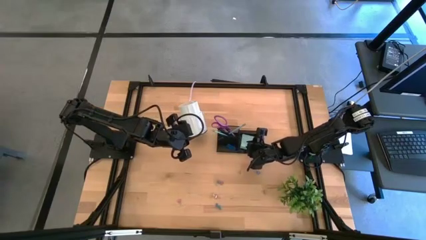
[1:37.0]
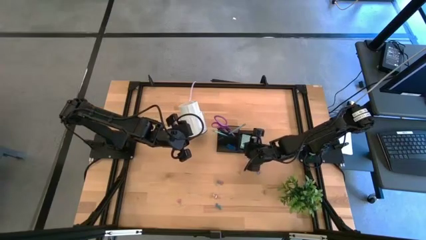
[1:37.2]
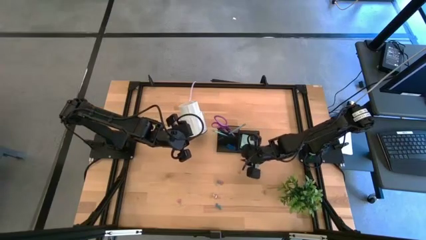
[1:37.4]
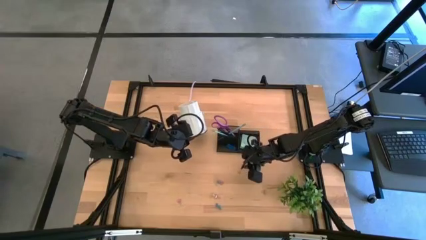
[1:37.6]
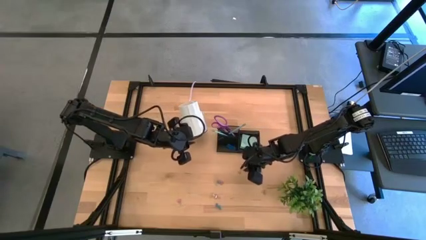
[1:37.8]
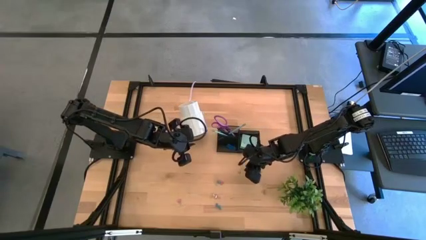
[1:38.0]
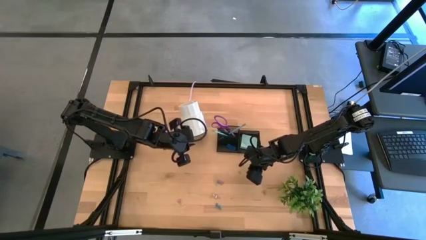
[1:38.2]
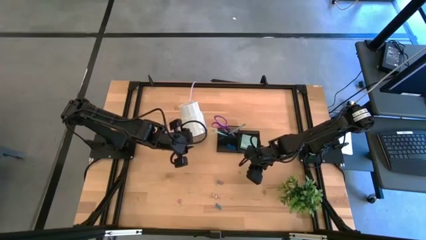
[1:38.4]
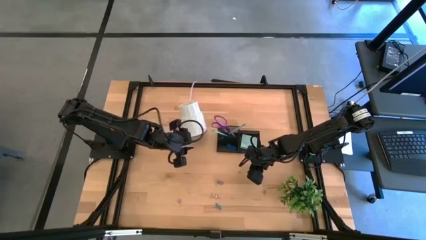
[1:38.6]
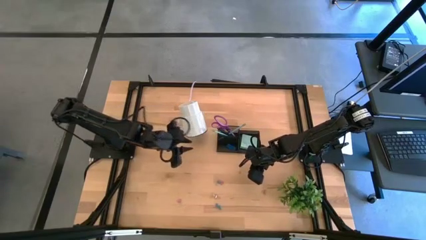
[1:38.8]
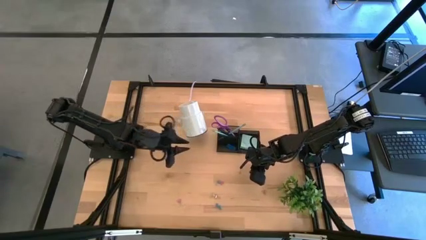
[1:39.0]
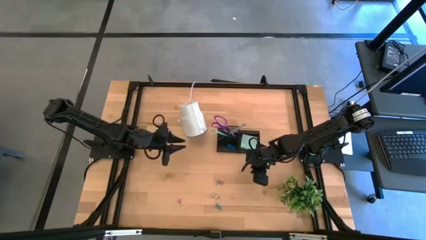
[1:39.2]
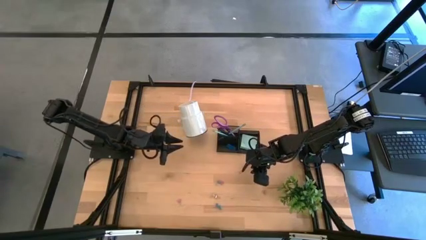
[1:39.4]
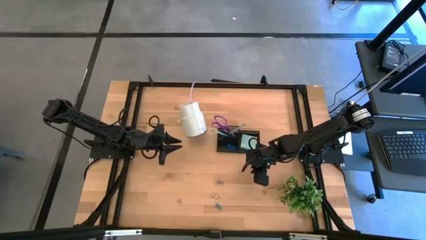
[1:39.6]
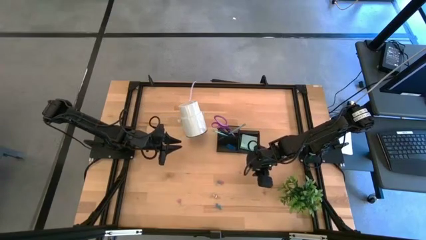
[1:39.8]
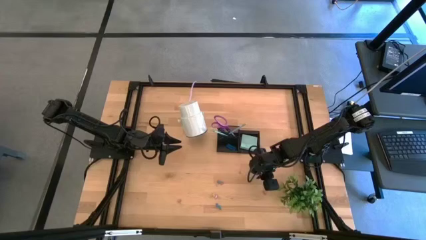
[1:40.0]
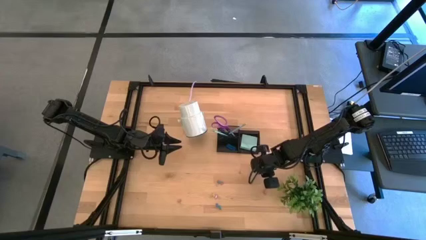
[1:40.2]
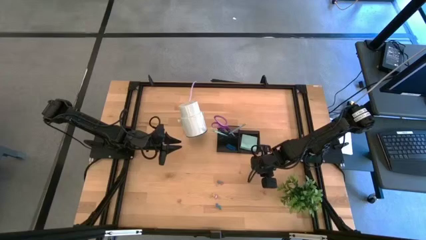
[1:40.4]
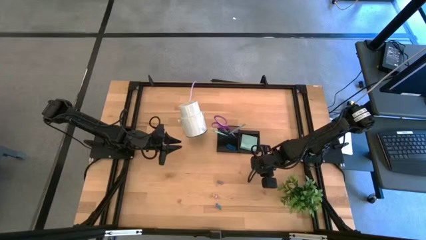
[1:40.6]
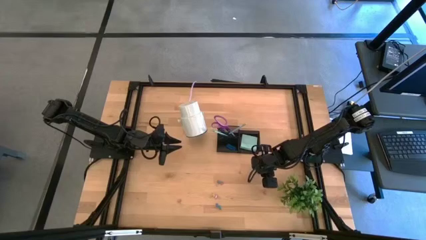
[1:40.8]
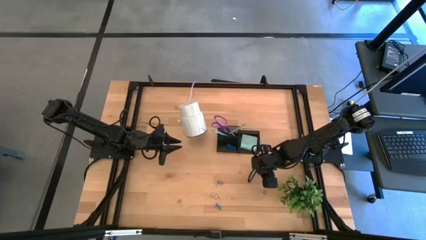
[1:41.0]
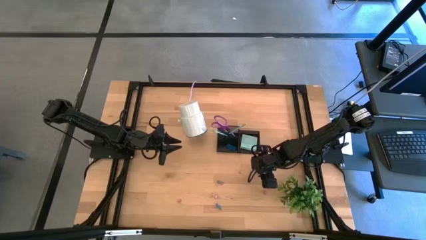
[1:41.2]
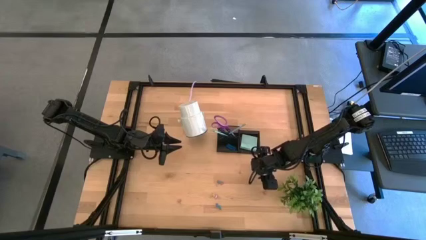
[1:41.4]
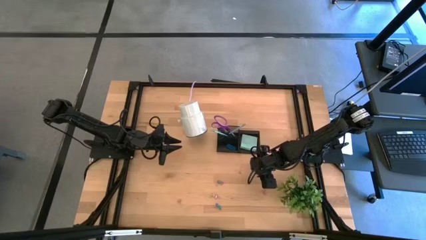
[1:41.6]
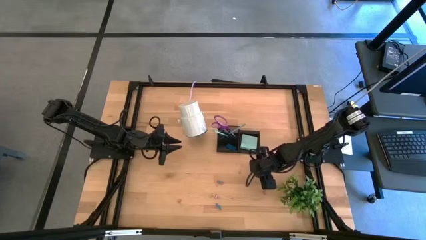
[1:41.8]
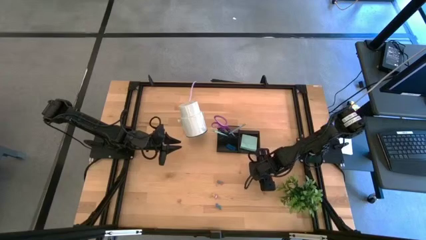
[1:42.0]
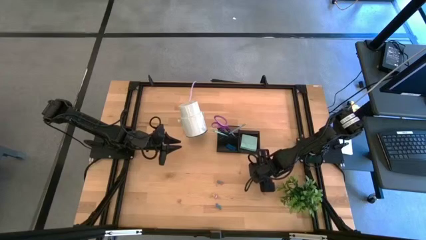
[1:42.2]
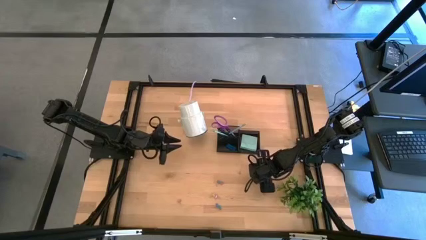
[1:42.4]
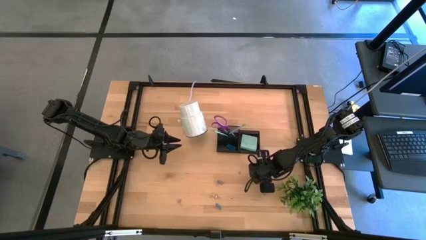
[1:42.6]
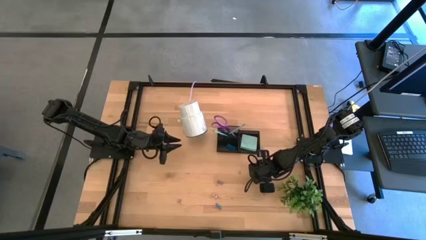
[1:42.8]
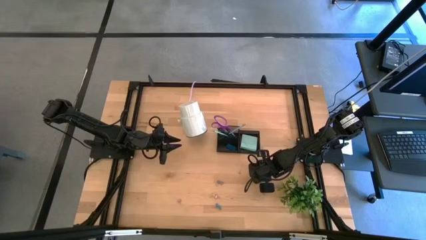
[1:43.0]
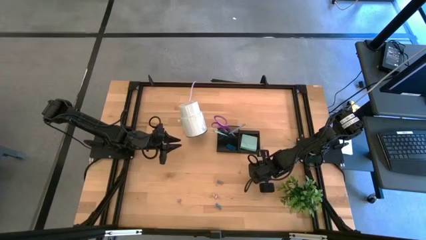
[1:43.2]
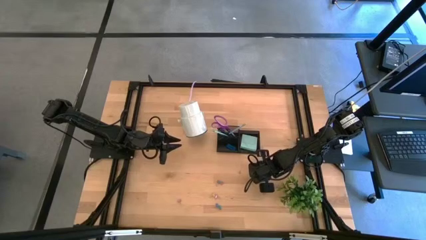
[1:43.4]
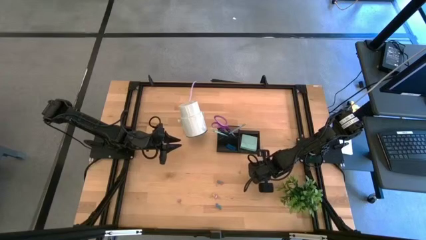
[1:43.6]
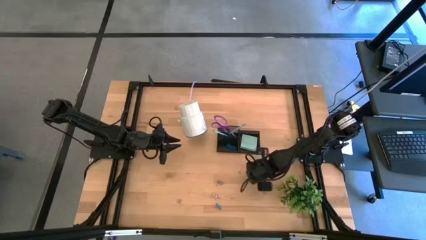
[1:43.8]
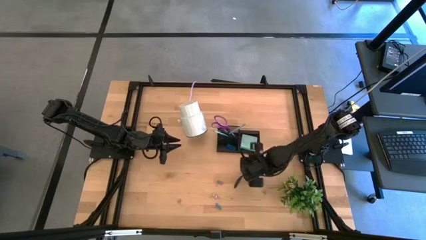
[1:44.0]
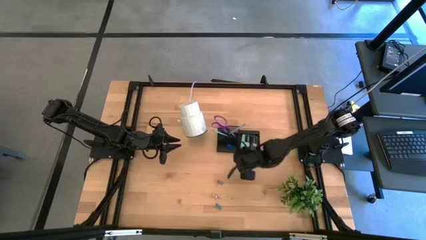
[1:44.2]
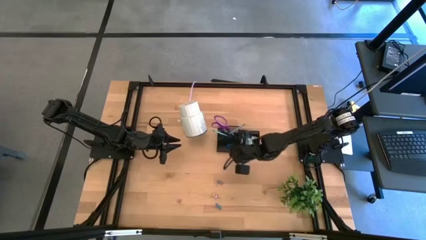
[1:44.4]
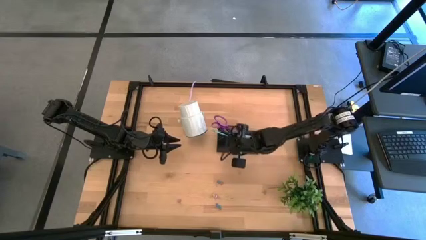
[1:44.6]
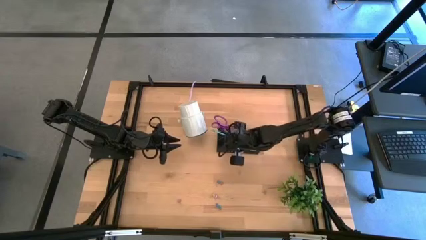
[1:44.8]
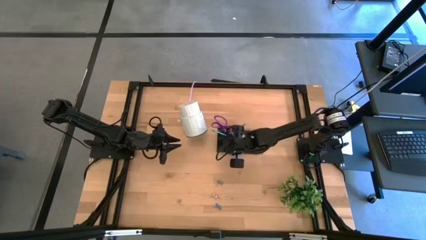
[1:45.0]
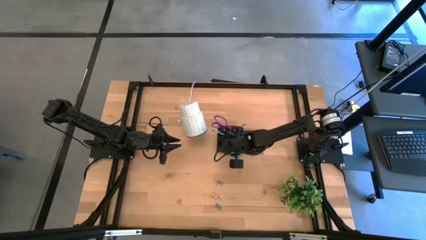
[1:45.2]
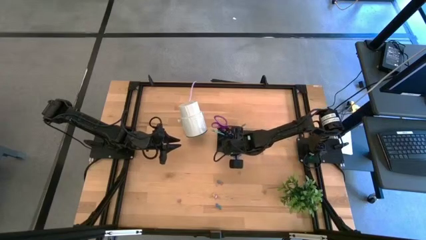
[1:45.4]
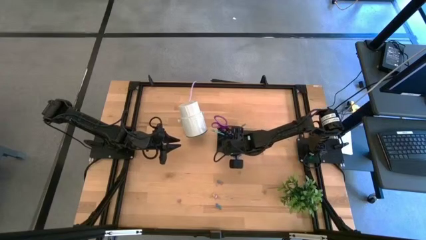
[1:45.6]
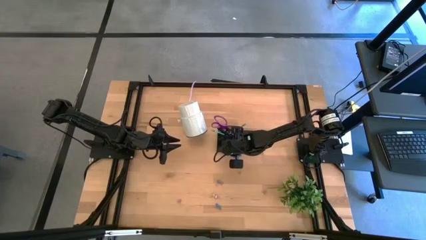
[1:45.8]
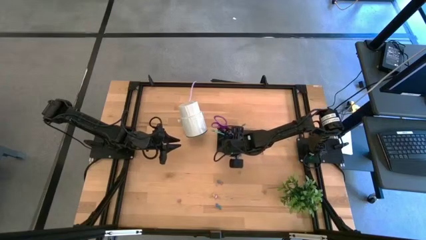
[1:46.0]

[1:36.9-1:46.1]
Task: Pick and place office supplies into organizer
Put the top blue binder clip into the black desk organizer

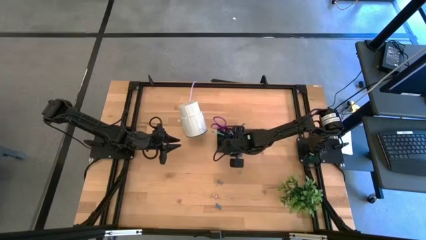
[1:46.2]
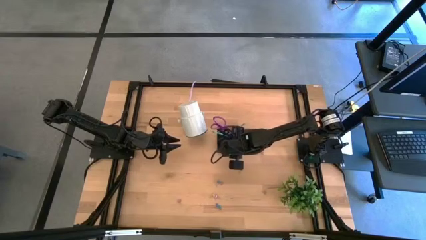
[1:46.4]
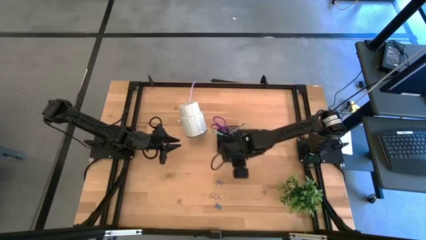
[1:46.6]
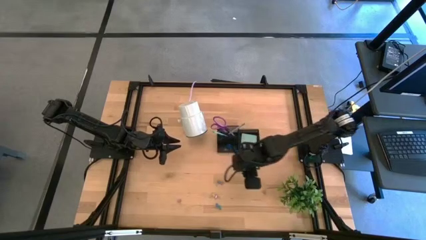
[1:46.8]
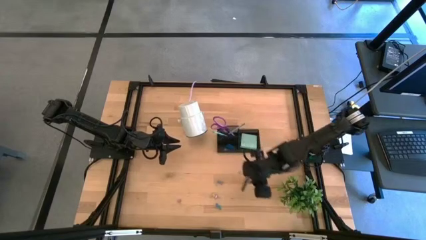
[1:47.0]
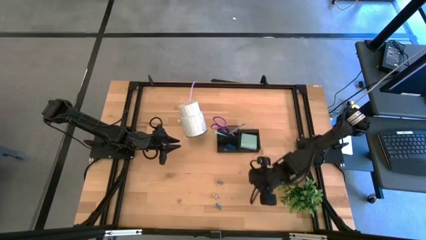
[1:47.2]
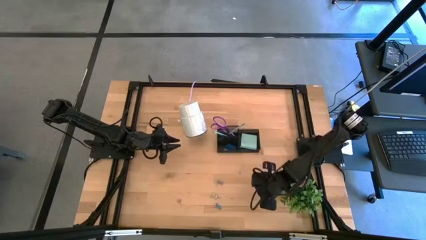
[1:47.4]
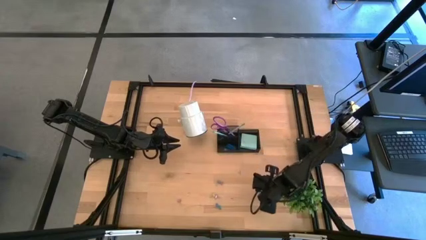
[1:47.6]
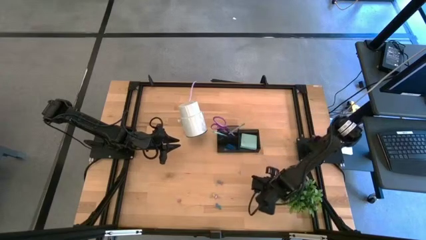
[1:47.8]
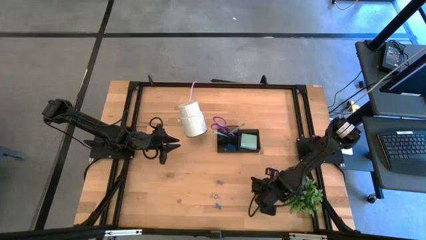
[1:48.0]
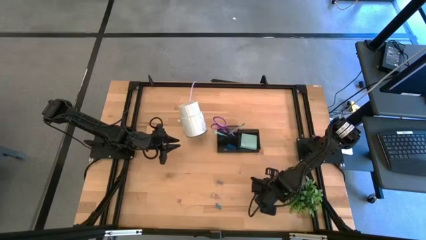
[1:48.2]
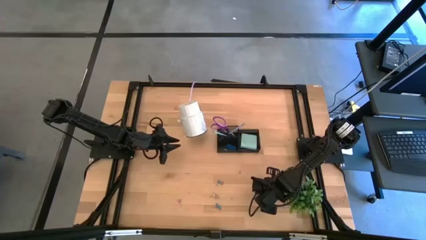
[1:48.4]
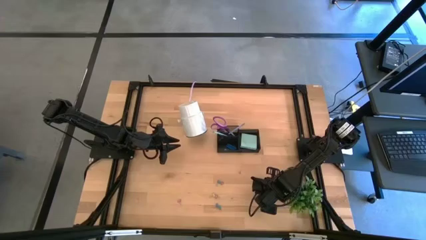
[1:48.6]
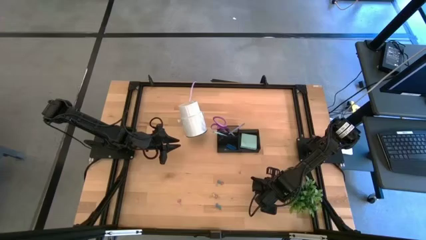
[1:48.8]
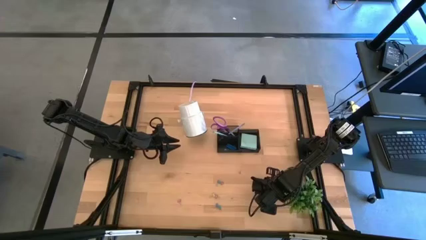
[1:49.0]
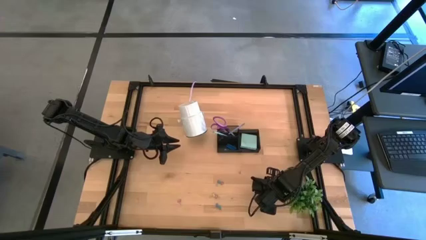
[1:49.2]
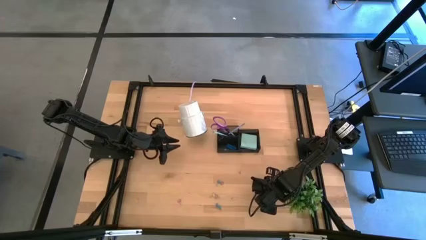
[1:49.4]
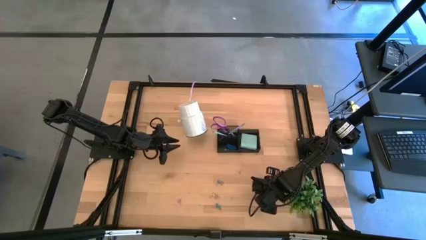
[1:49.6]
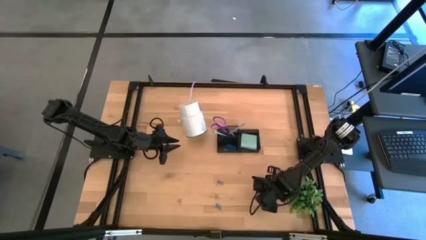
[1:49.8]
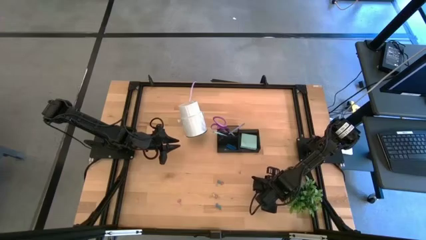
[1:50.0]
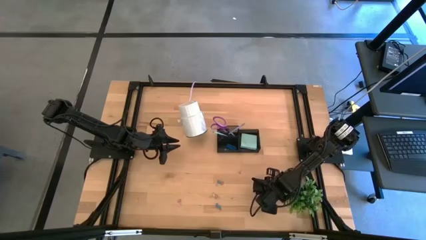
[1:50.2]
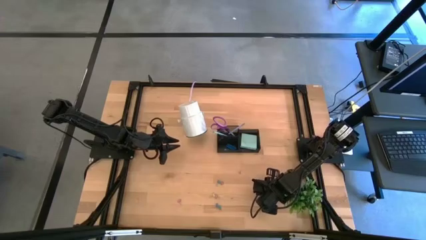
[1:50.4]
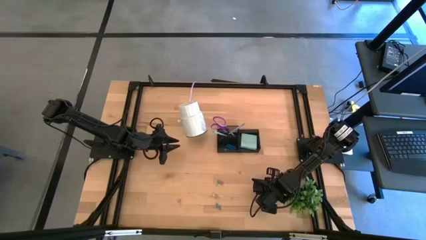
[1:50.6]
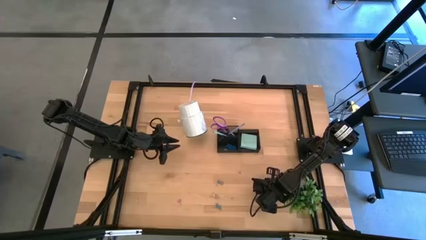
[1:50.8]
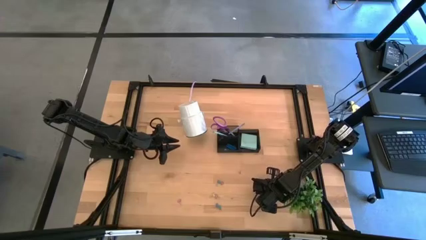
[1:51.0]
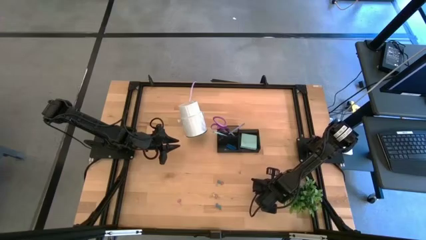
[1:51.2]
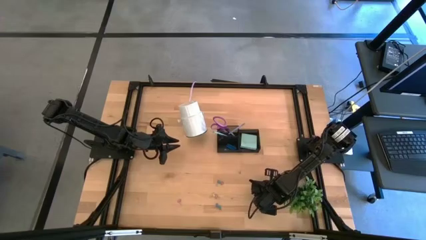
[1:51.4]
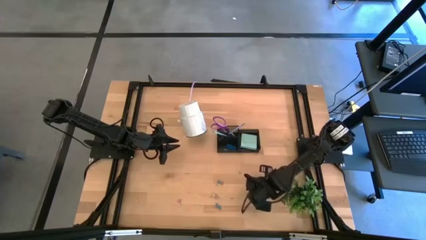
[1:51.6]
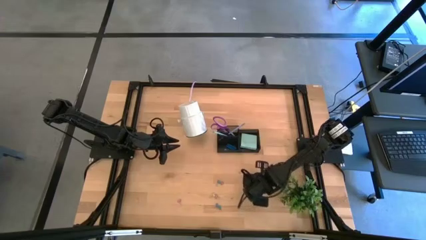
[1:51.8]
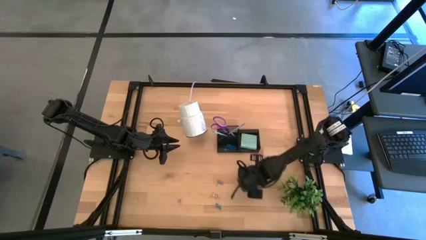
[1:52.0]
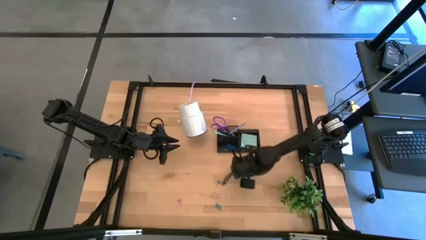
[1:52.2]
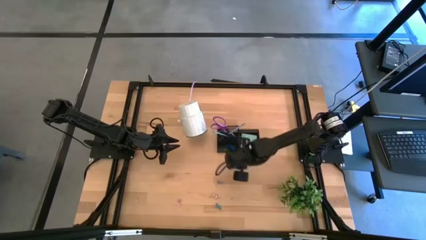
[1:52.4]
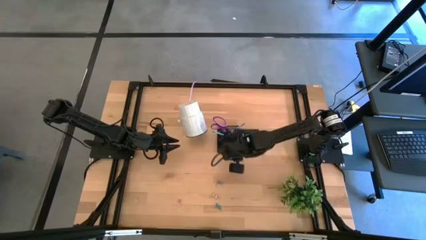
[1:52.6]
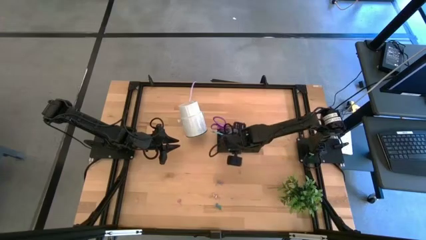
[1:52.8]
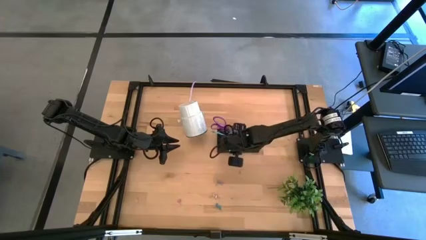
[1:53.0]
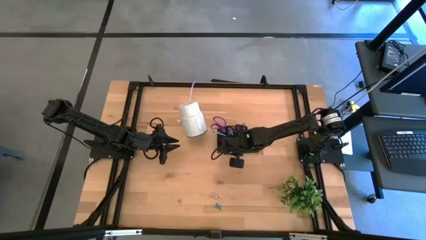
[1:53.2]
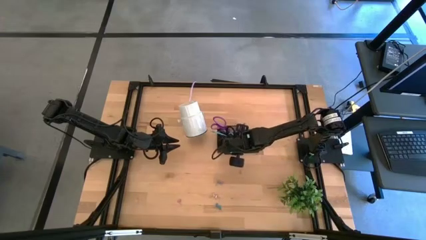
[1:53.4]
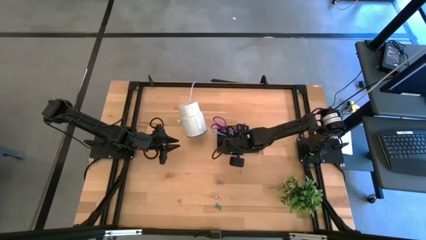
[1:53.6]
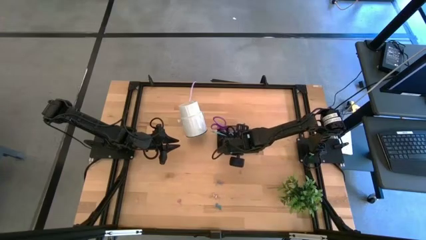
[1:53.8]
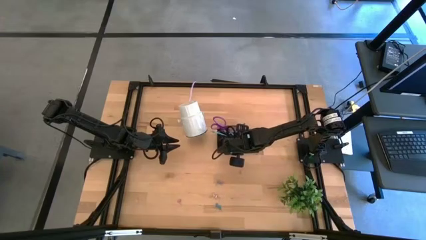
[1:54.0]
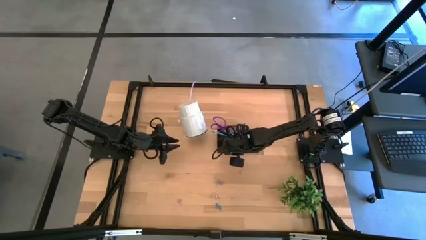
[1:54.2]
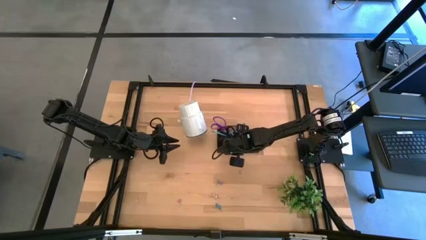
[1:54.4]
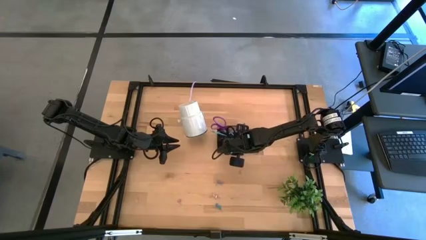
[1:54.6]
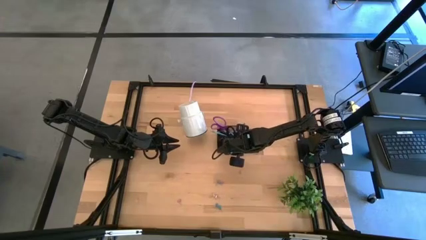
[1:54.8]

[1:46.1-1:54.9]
Put the pink binder clip into the black desk organizer
